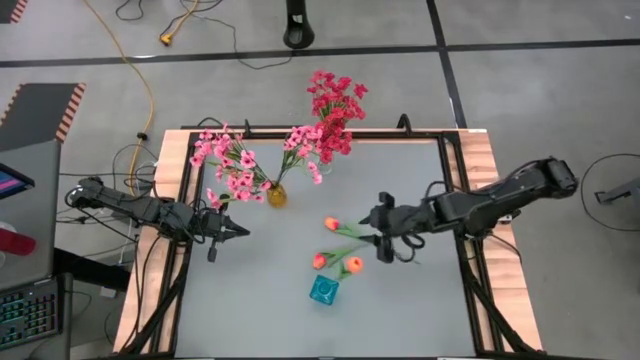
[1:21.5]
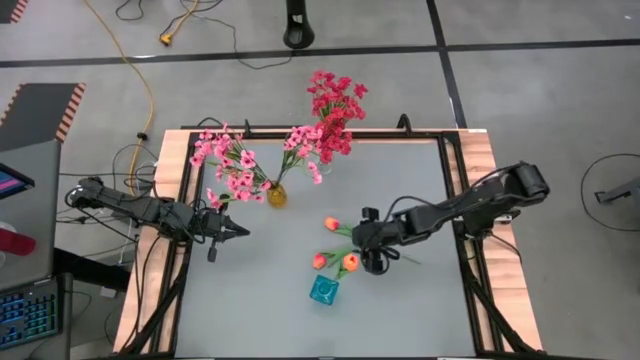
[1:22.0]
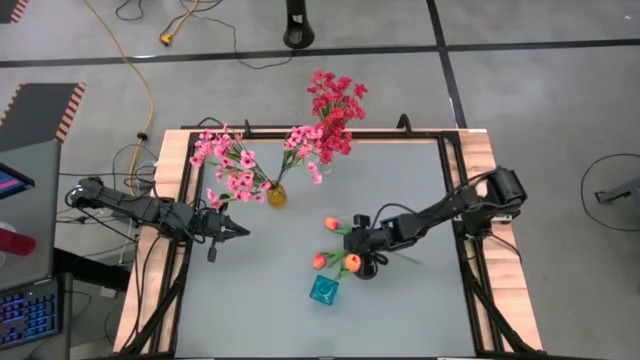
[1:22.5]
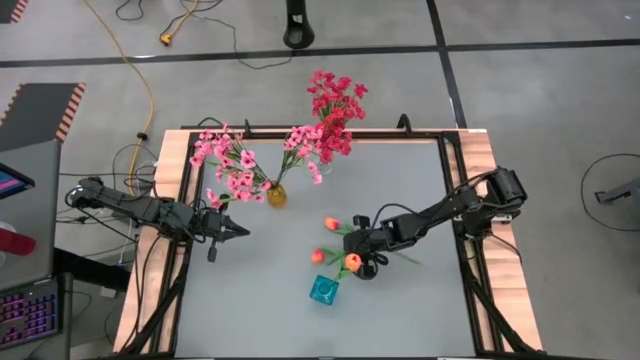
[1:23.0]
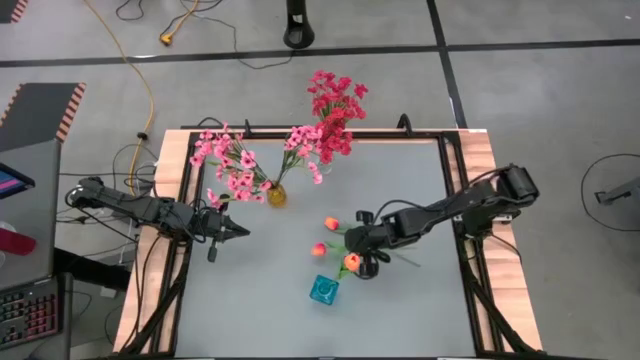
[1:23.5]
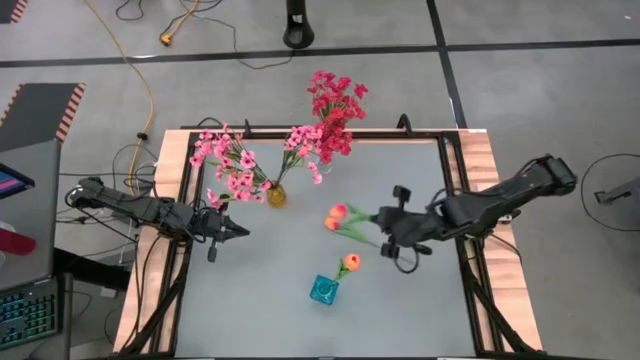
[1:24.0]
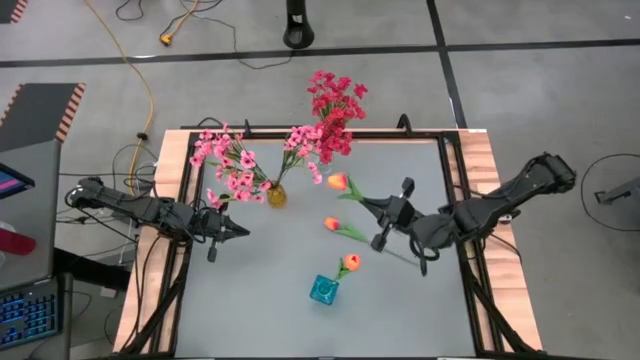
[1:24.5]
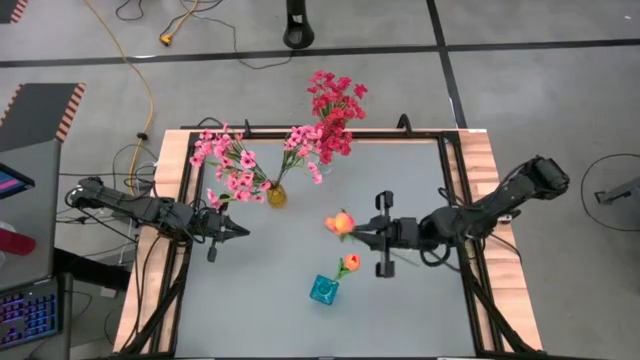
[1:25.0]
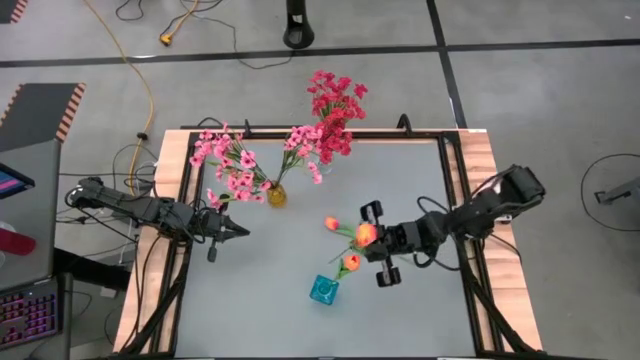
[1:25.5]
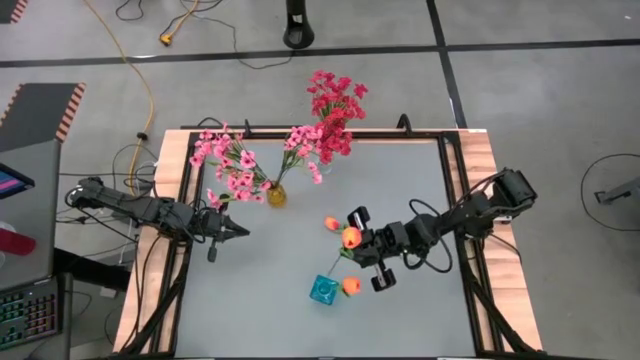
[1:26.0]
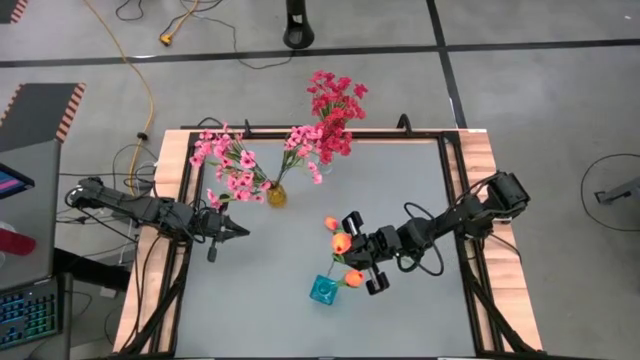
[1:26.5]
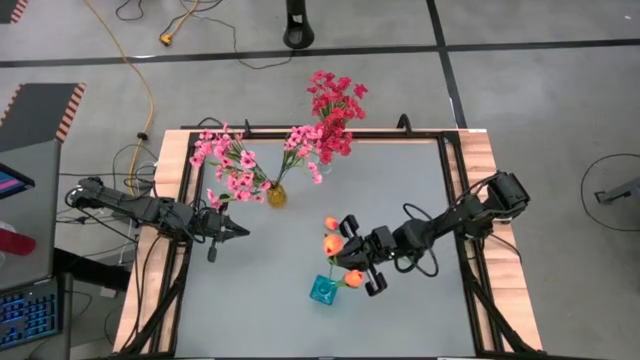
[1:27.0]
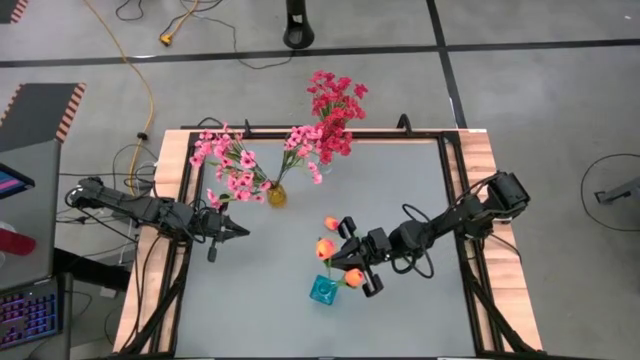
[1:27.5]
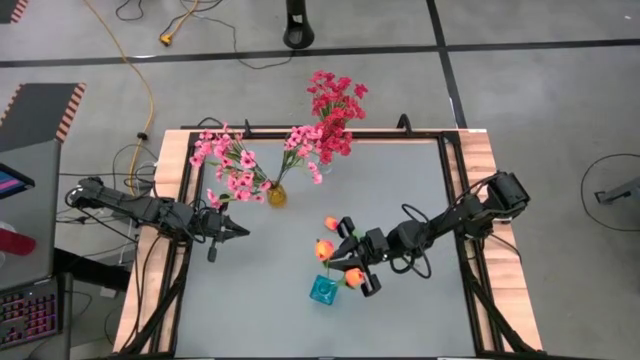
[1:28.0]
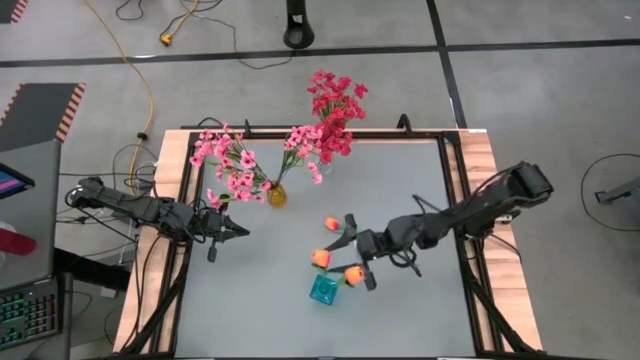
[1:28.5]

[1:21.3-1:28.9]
Task: Sort flowers into vase by color
Put the bottom orange tulip into the blue vase

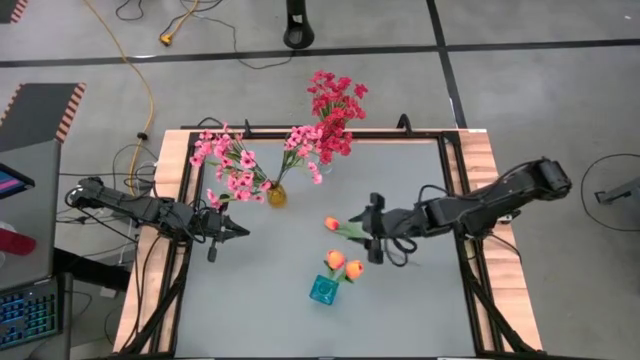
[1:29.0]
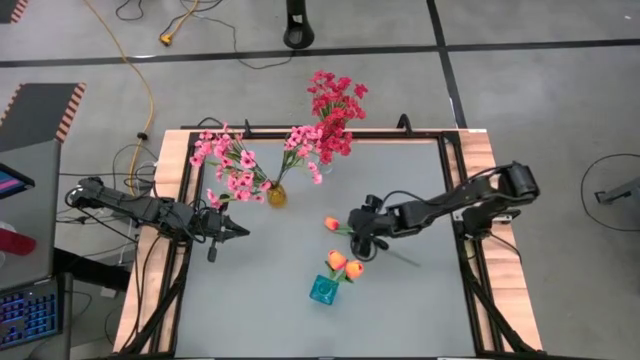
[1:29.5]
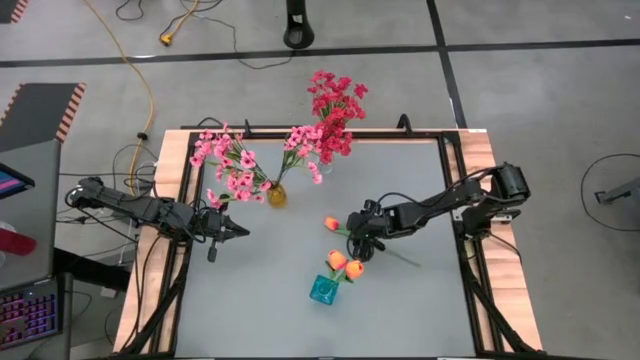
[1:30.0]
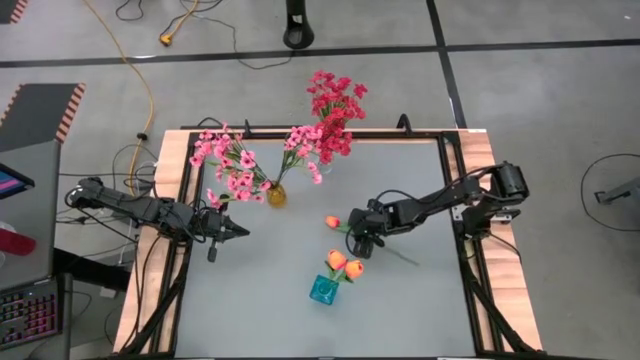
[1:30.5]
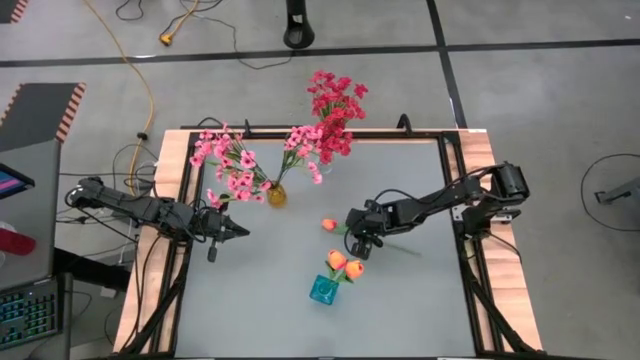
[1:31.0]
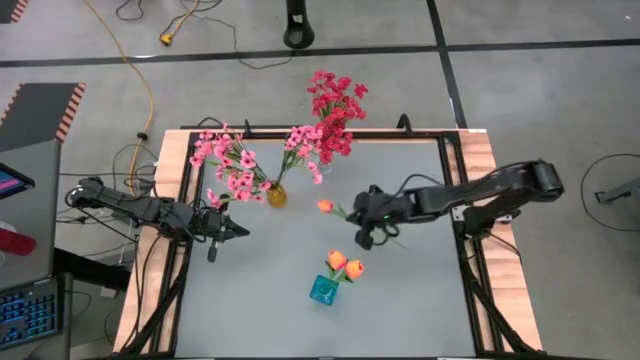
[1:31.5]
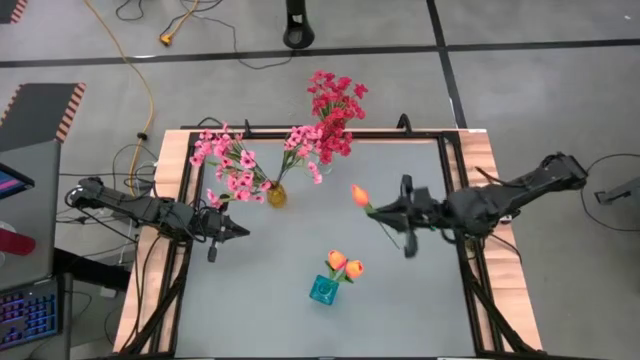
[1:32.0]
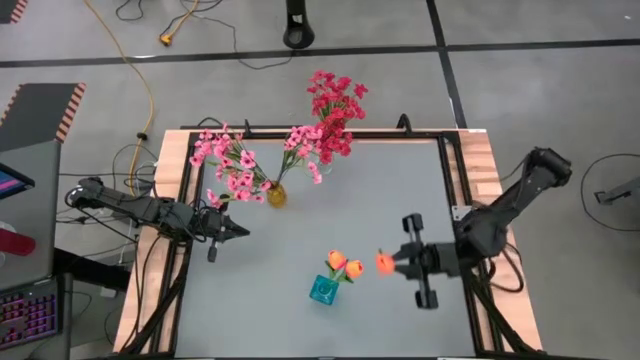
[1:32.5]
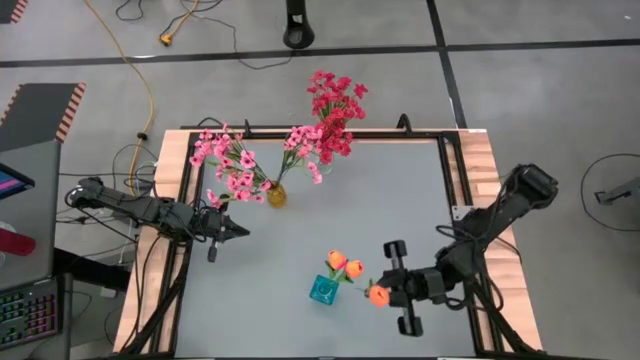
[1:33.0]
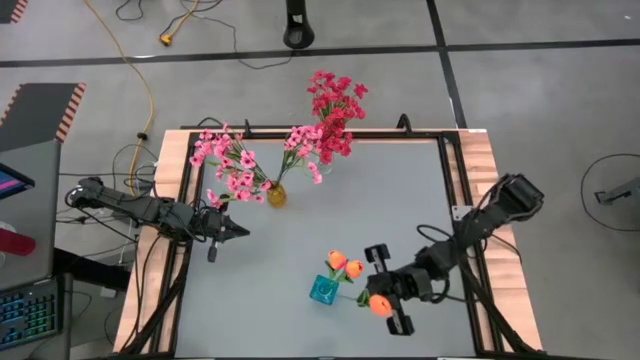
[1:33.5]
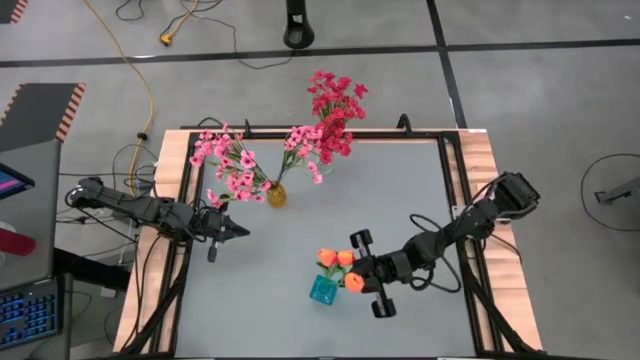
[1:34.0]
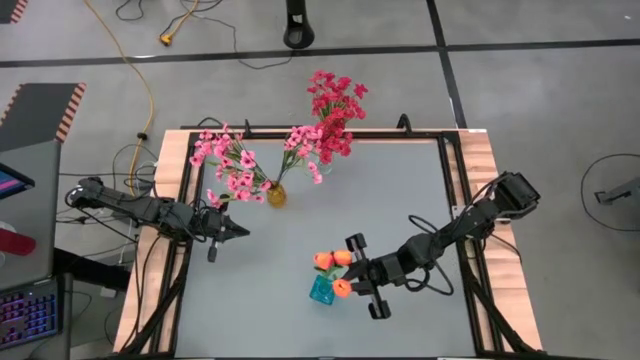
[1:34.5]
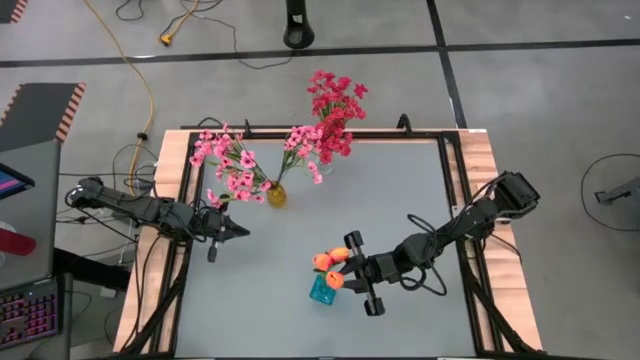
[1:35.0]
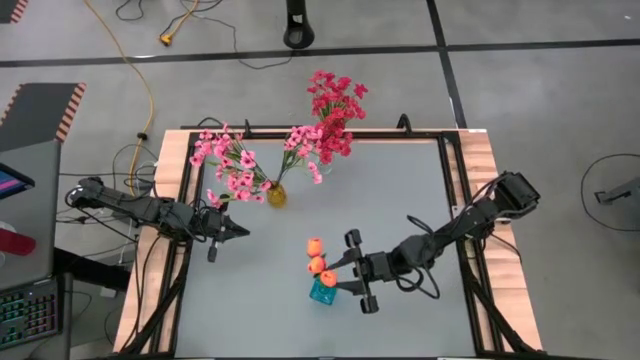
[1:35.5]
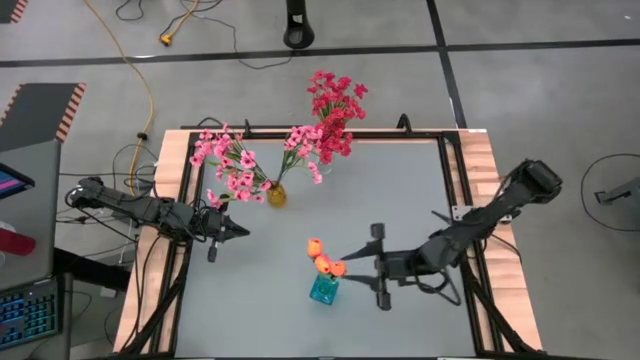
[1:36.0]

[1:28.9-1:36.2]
Put the orange tulip into the blue vase

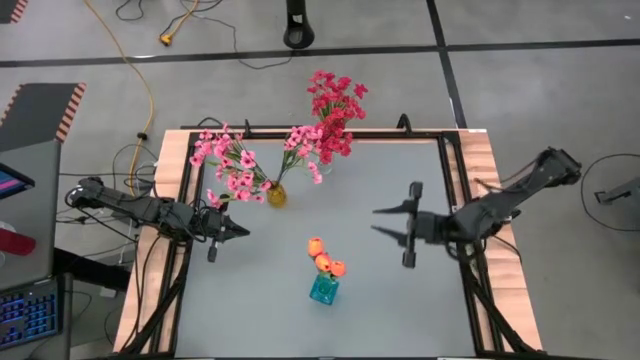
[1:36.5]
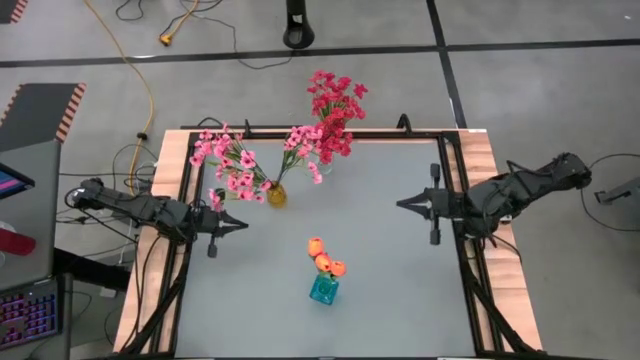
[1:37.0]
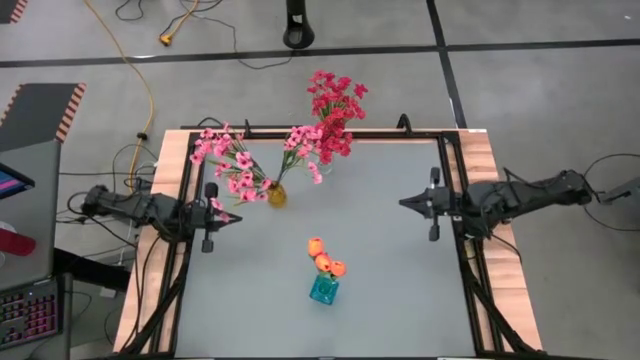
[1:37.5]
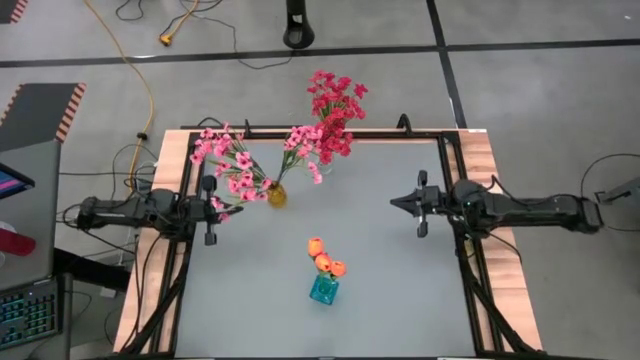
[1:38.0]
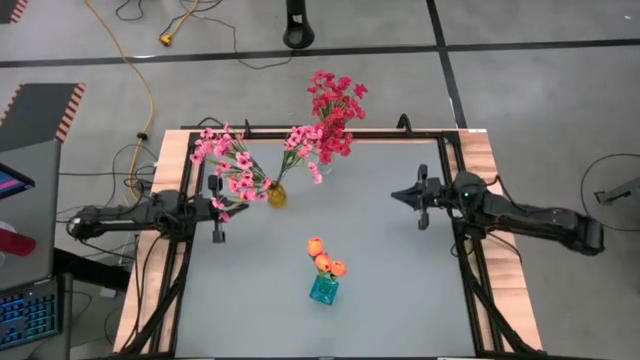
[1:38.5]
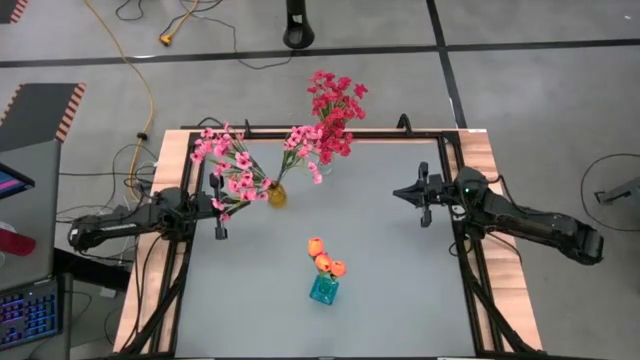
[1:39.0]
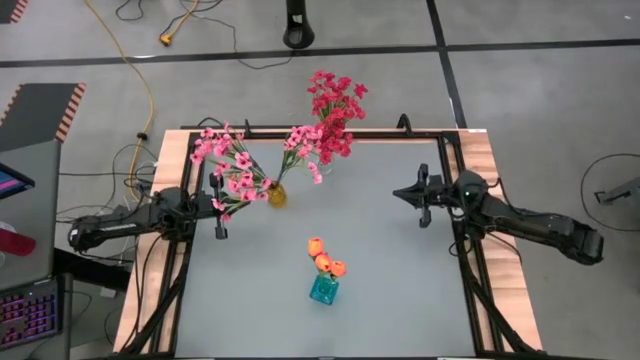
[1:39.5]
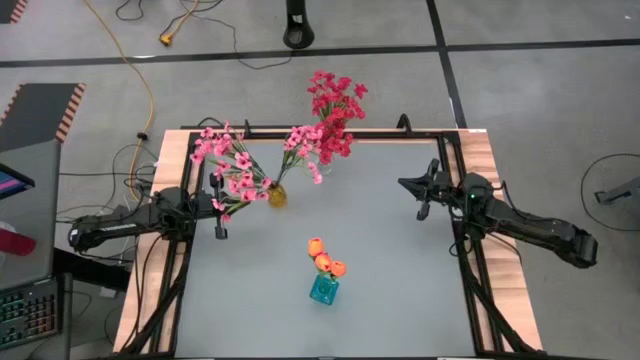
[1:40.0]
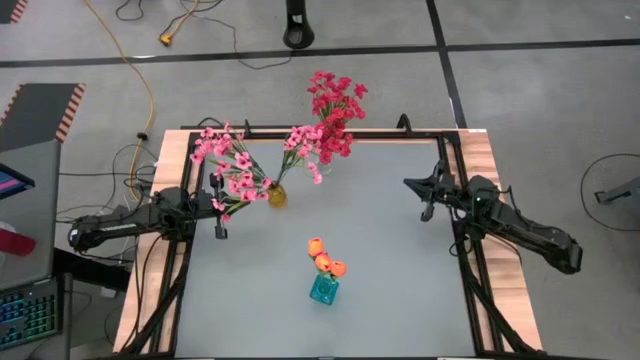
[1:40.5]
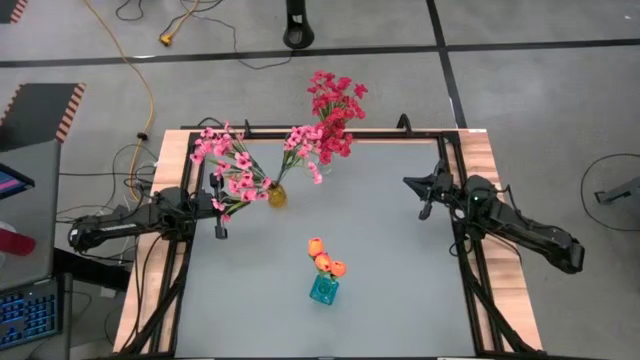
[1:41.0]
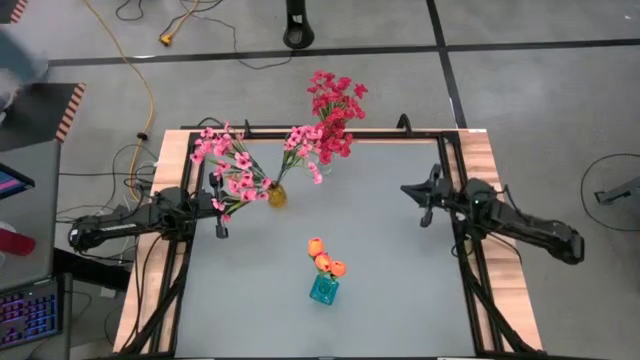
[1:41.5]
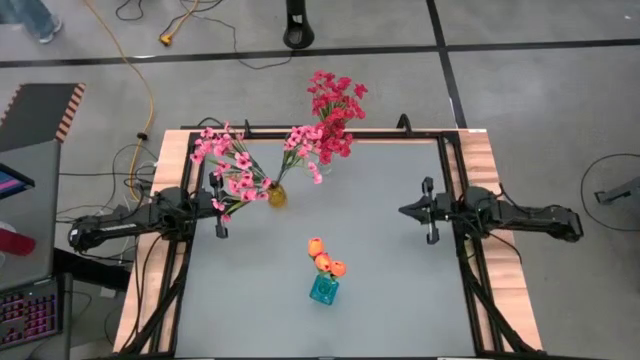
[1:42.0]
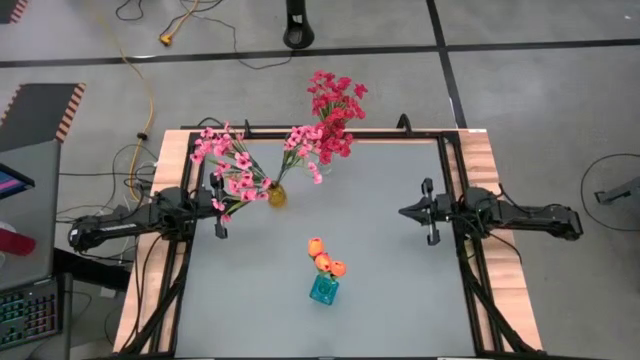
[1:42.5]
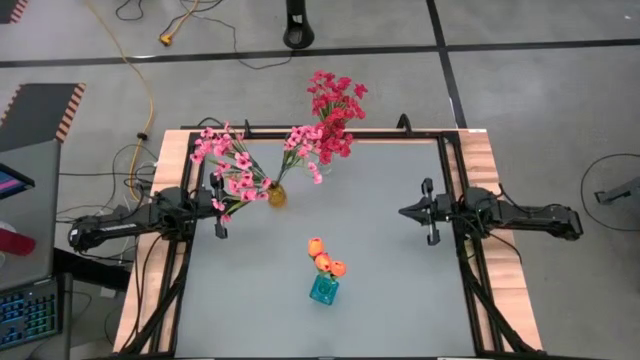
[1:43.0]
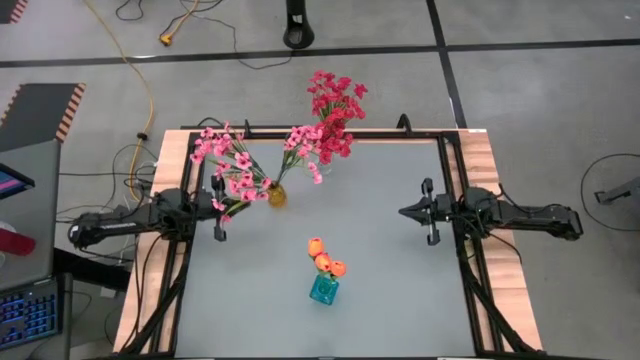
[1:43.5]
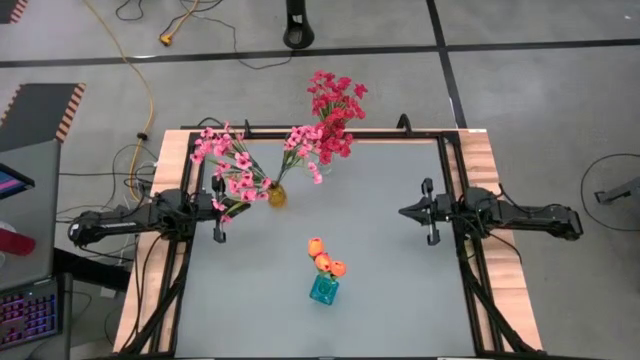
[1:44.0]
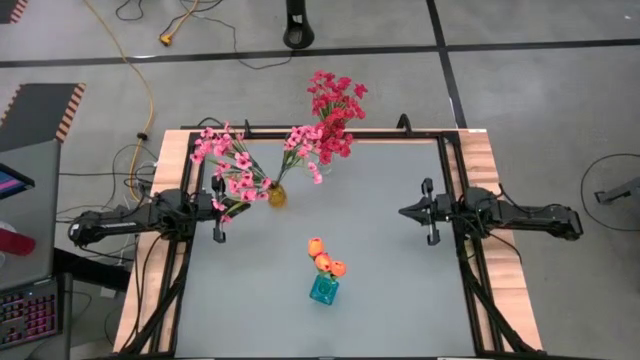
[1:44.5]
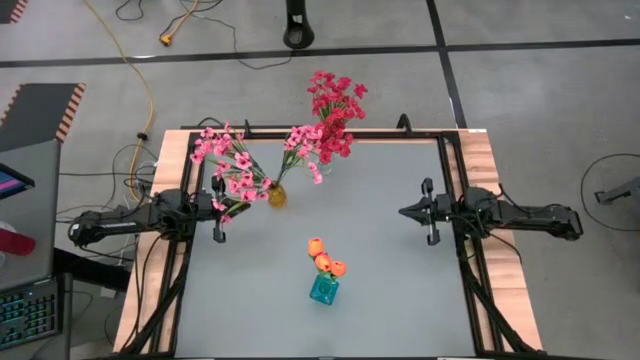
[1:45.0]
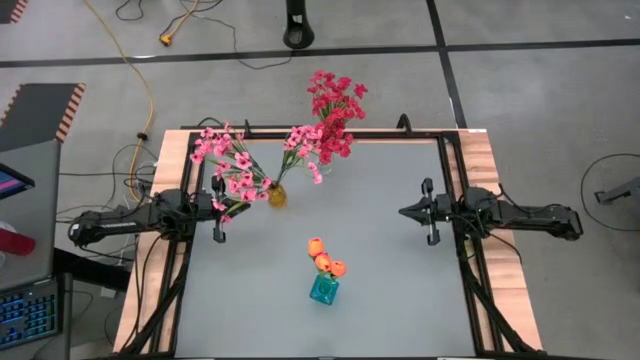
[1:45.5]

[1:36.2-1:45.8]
Return to Home Position
